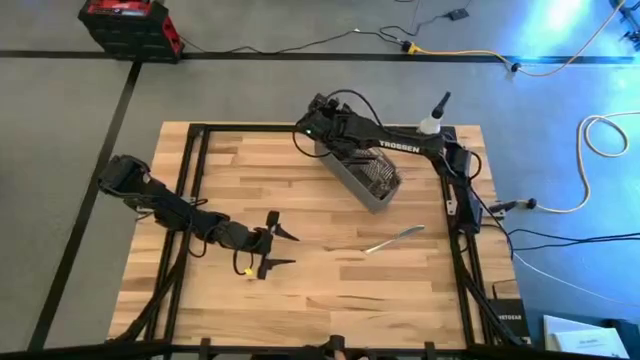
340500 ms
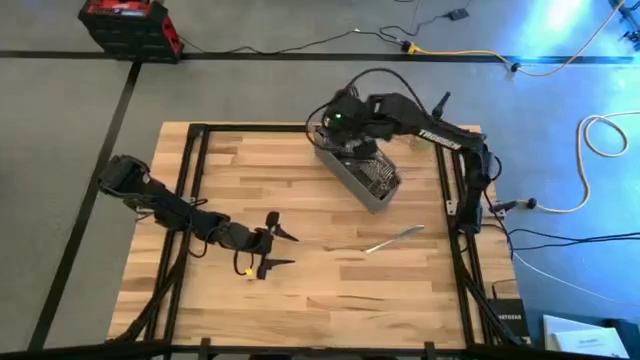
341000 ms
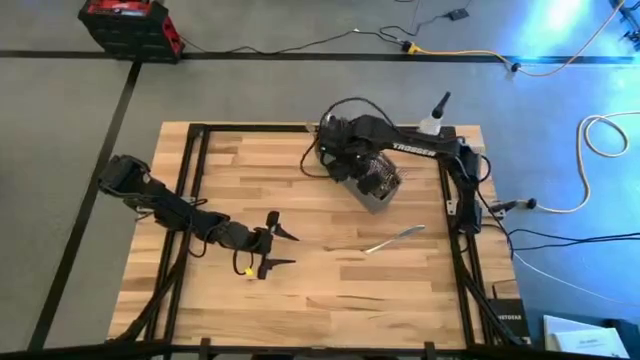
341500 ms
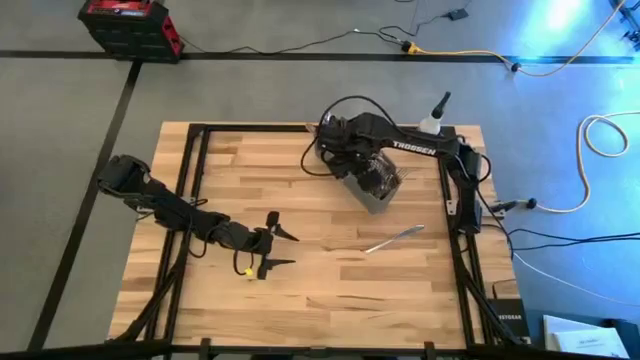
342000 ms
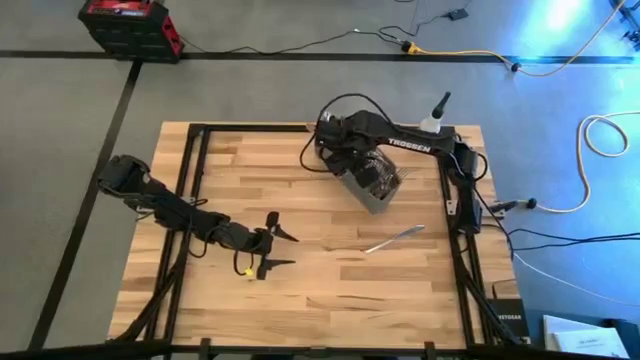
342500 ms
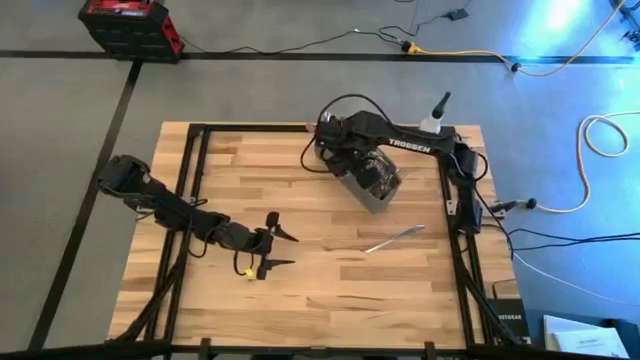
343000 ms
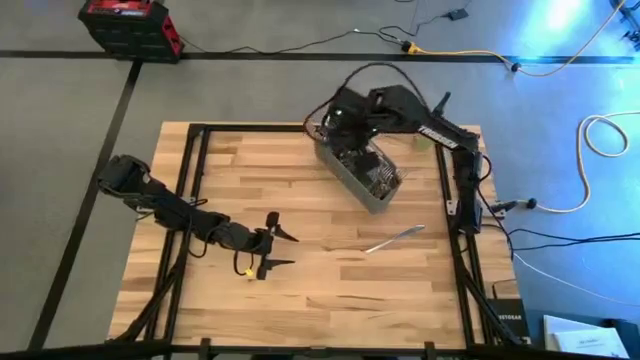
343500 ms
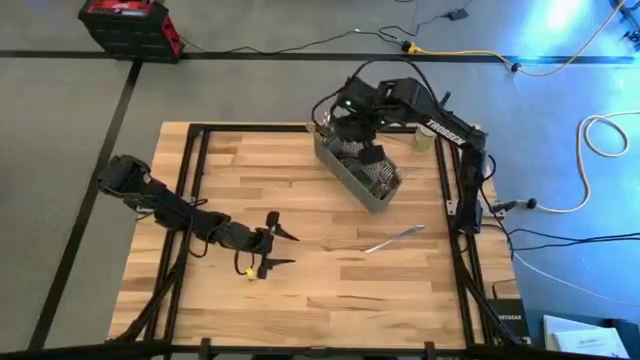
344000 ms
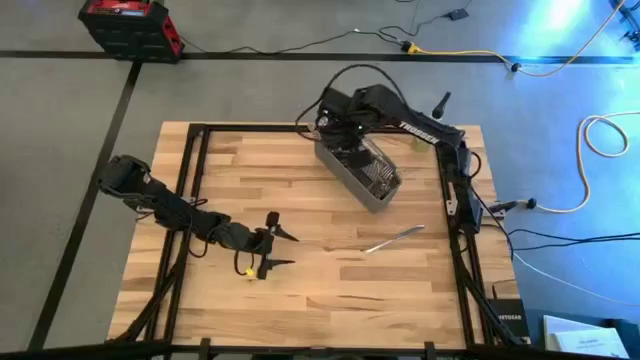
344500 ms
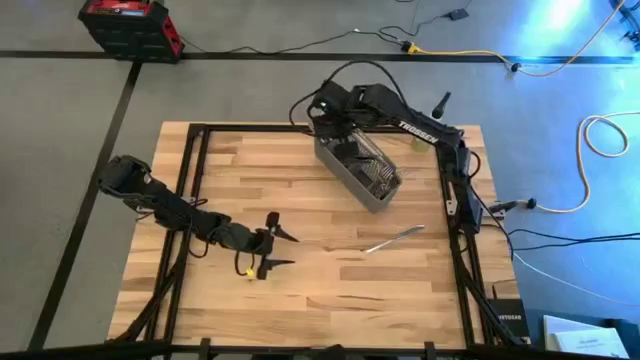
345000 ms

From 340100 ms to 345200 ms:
Task: Sort silverware
Put the silver spoon into the gray silverware organizer

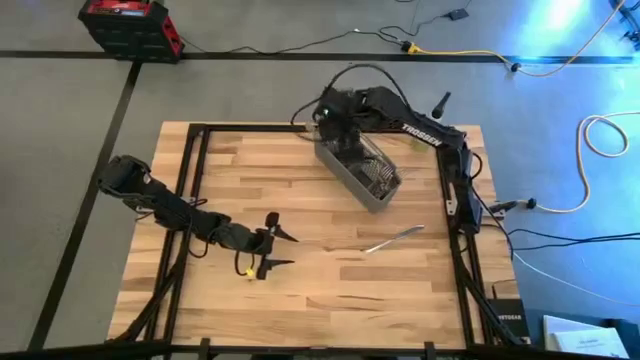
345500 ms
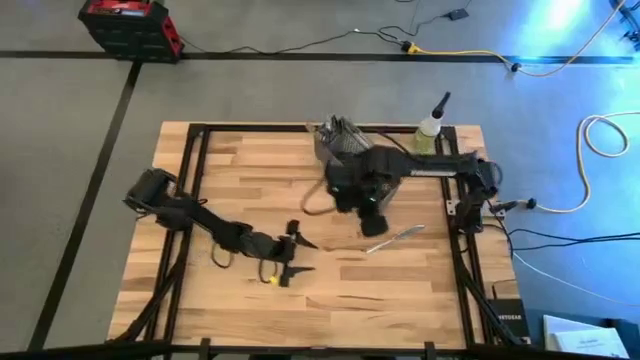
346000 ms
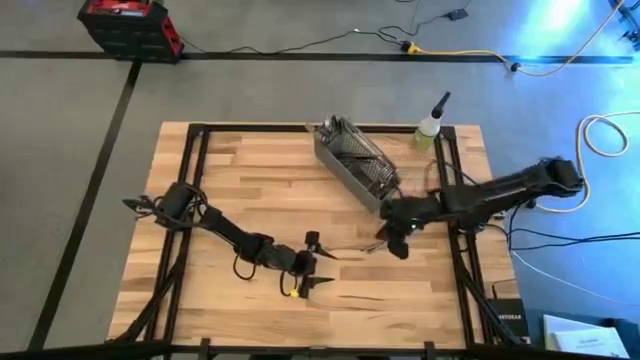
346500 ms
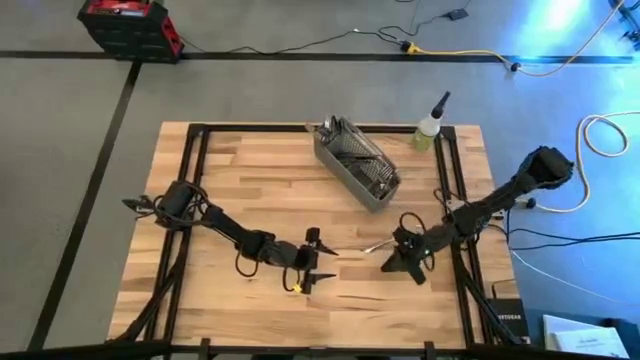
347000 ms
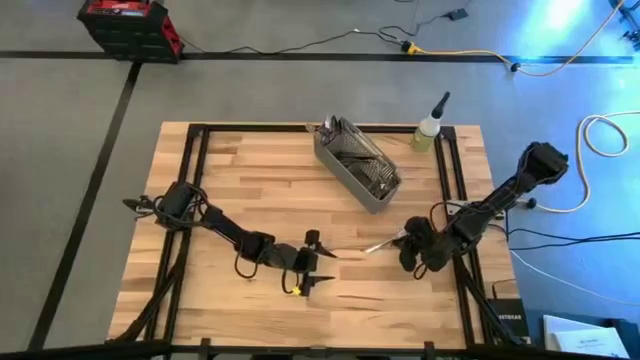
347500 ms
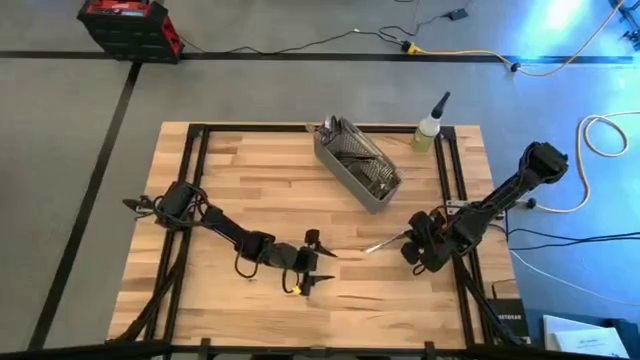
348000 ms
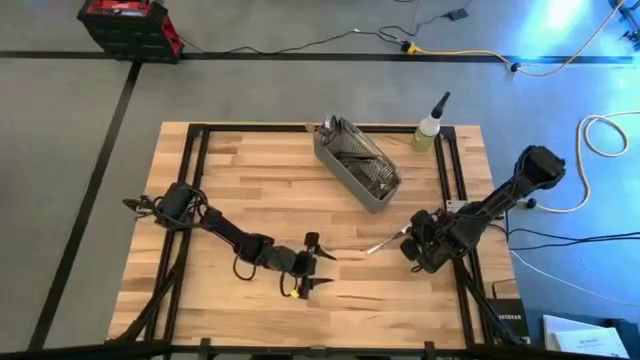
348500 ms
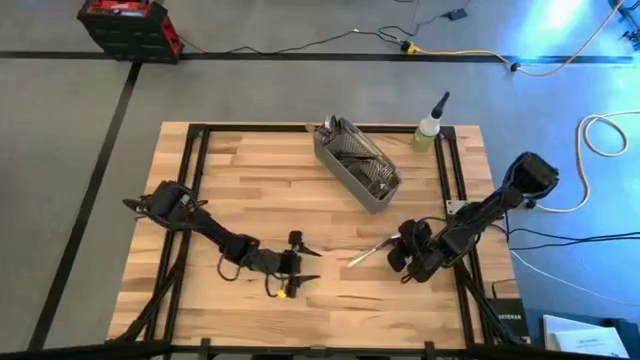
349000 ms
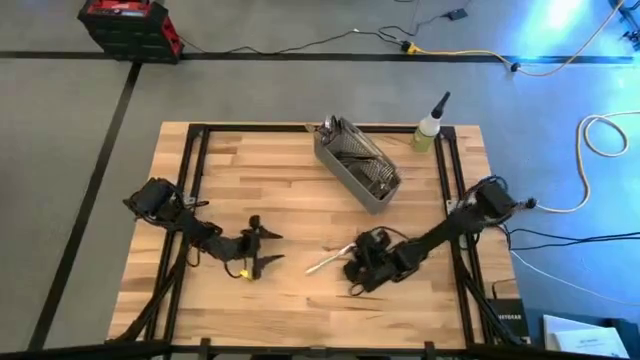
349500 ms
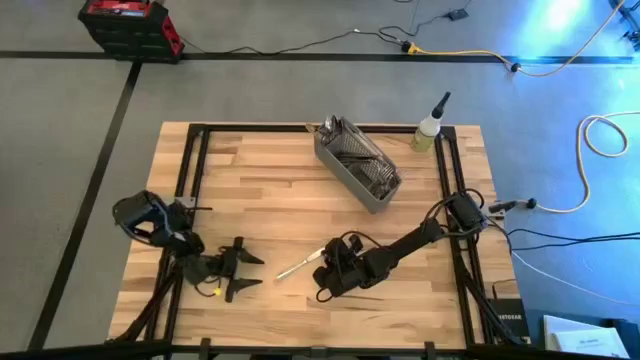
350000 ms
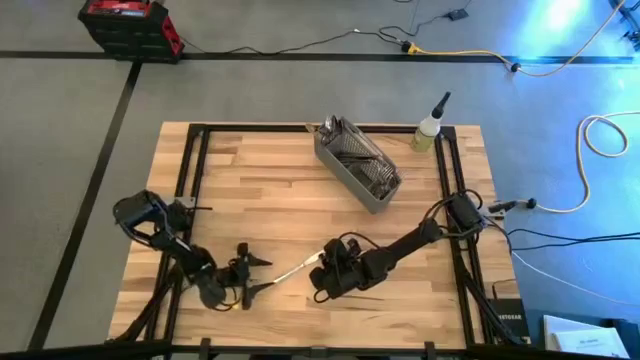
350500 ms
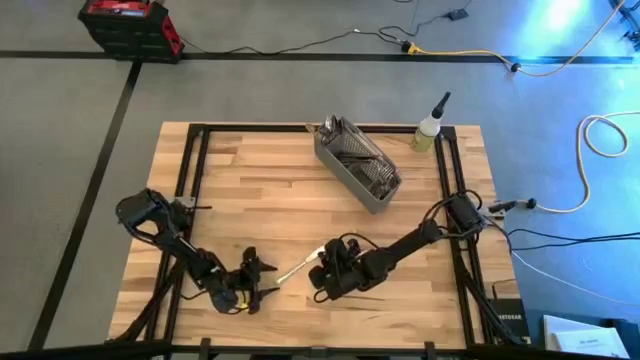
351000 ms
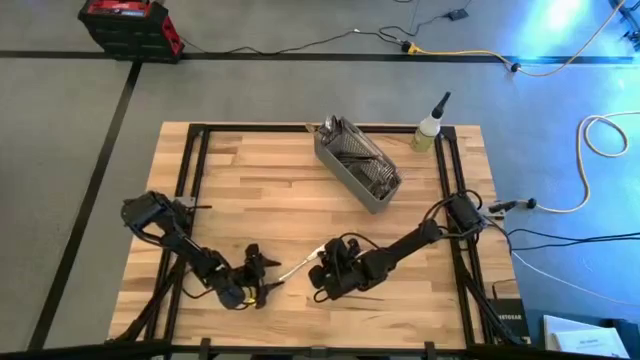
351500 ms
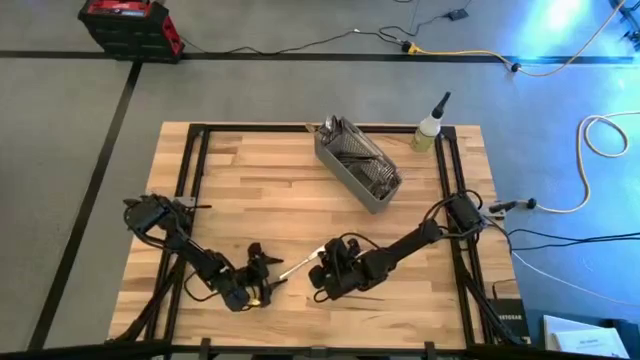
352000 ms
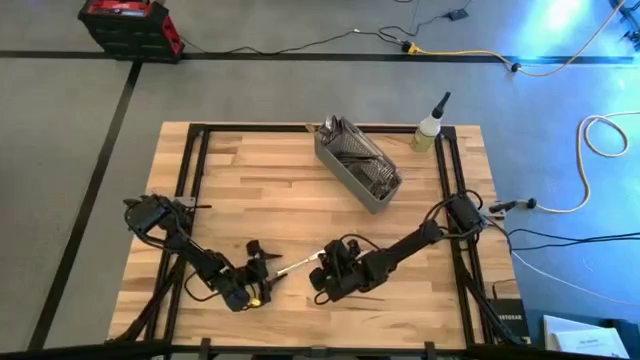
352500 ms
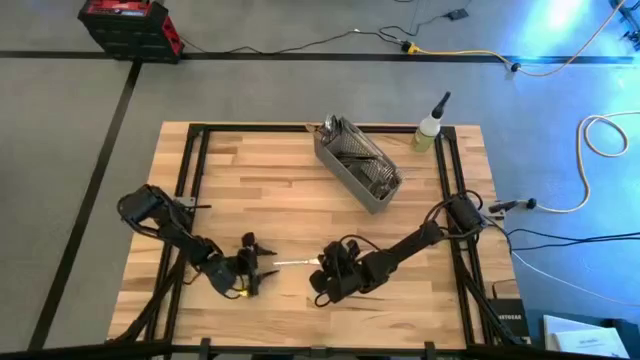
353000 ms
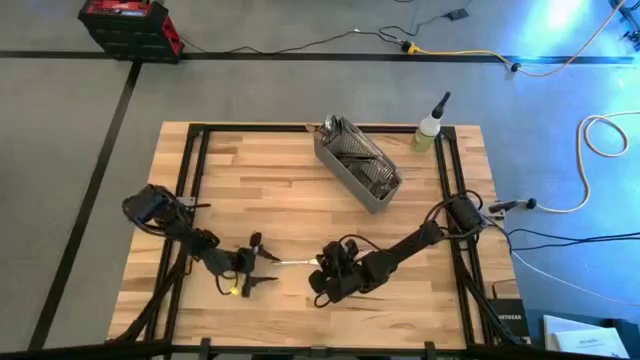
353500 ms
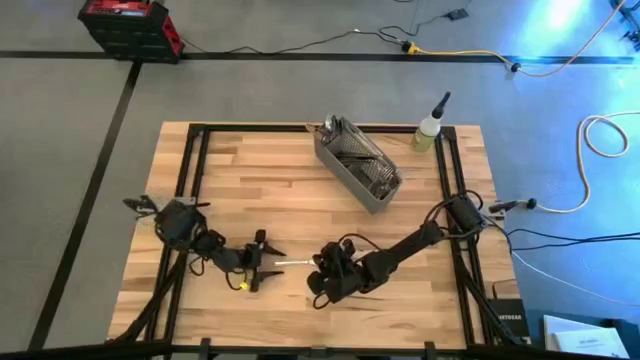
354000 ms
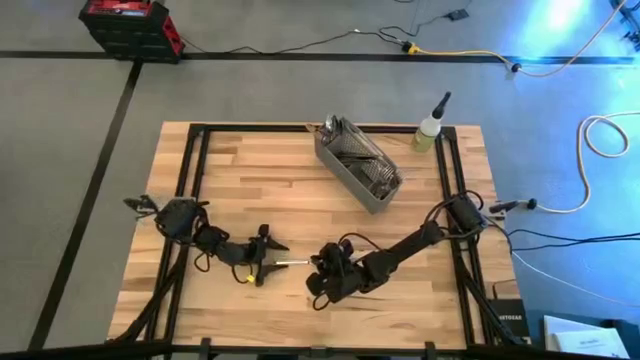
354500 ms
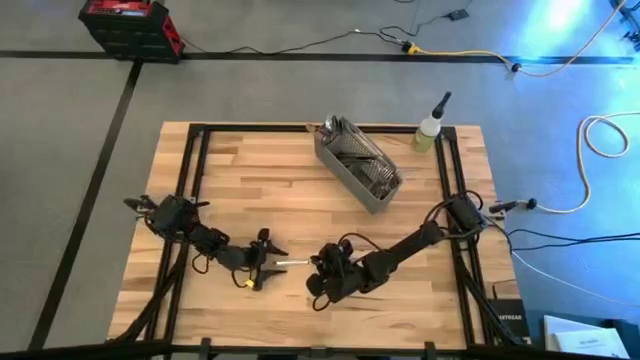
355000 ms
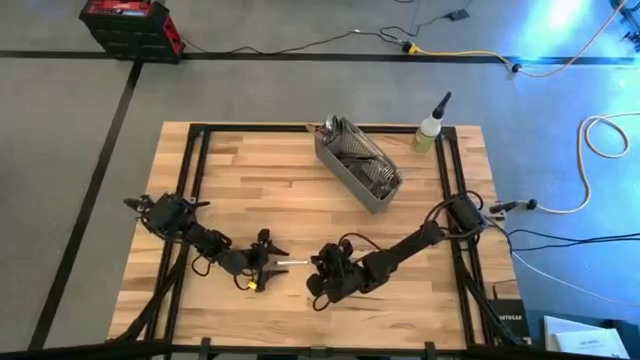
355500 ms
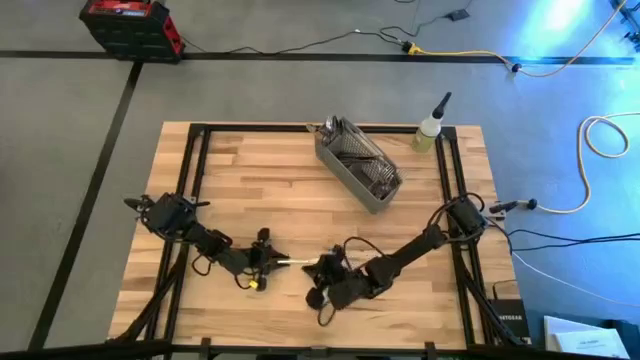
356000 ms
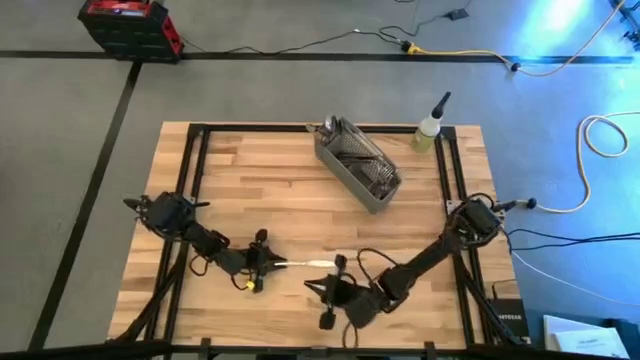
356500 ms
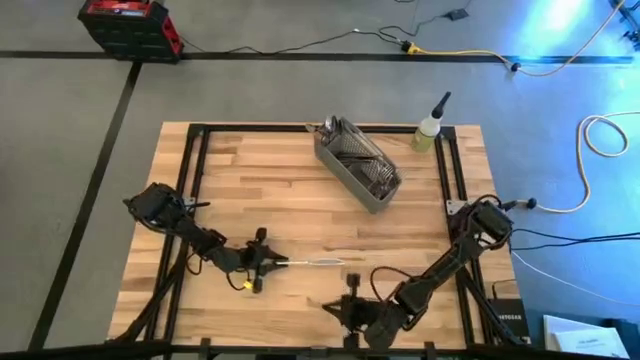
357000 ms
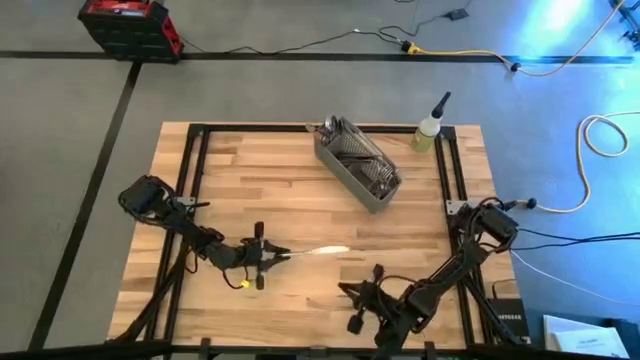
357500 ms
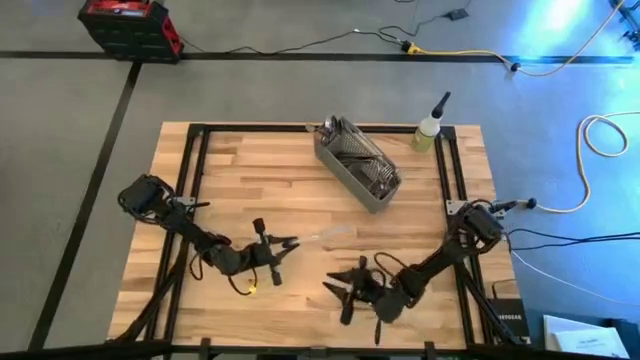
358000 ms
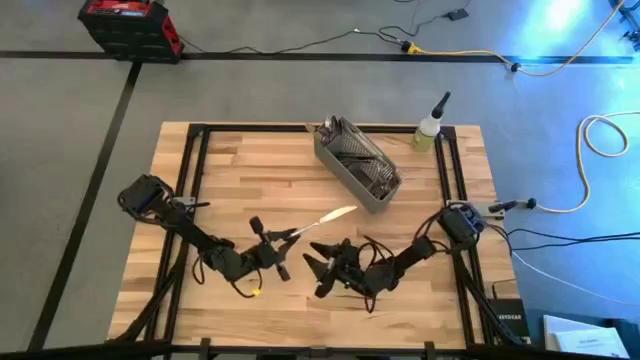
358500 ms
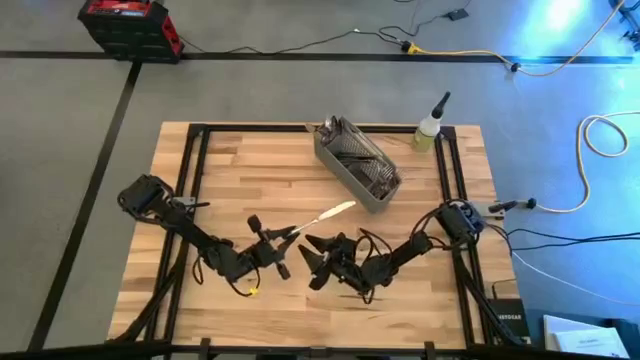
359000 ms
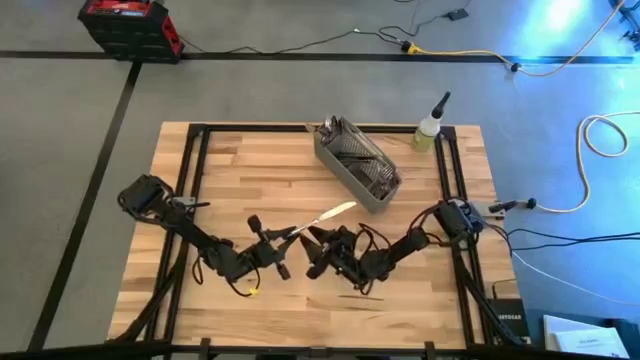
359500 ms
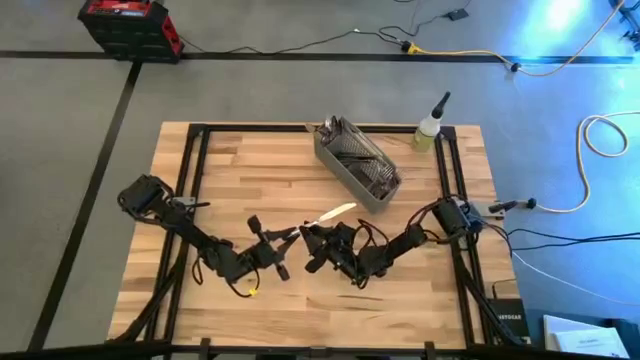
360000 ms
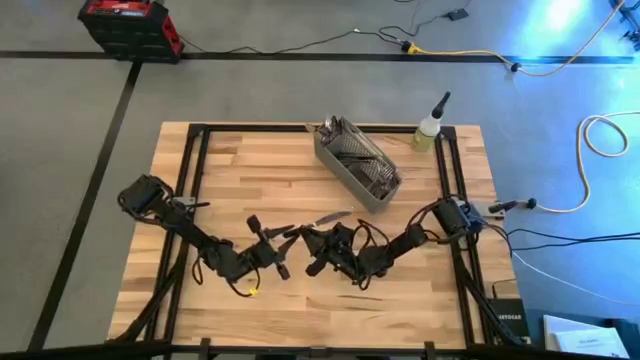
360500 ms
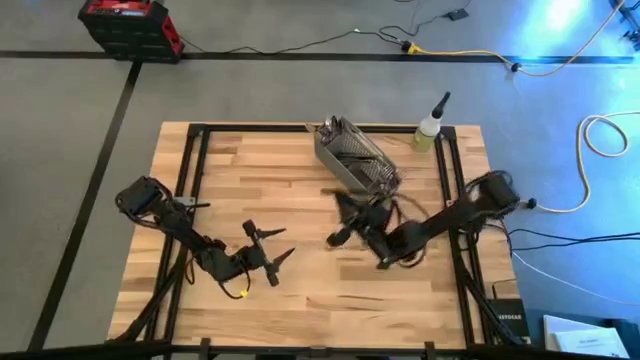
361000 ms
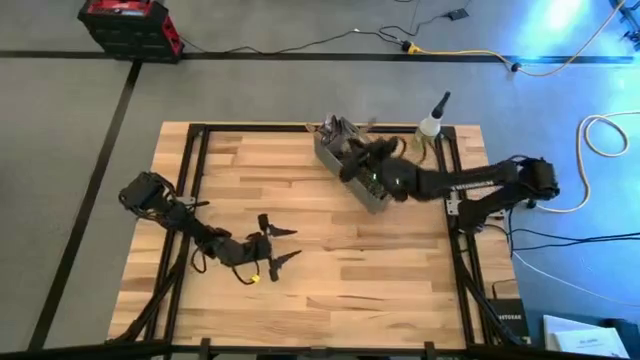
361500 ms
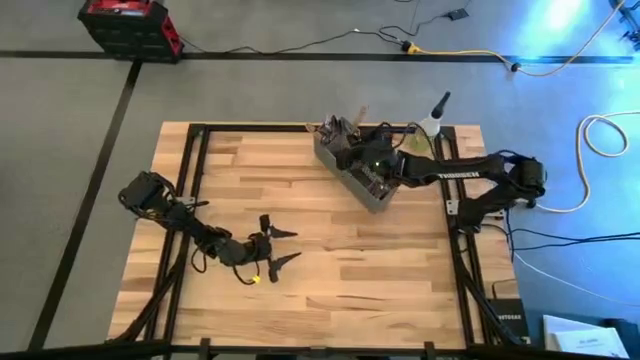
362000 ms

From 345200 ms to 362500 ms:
Put the silver knife into the gray silverware organizer
